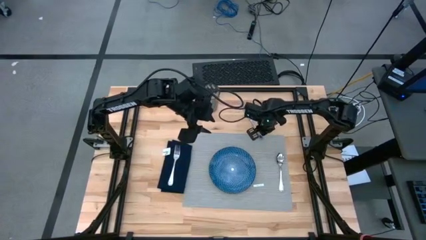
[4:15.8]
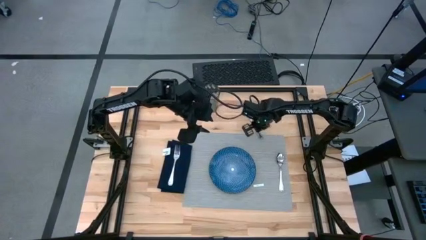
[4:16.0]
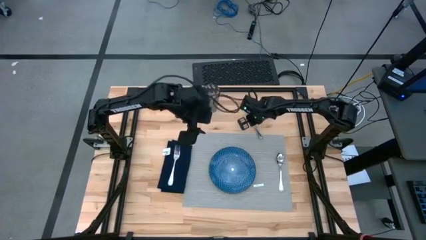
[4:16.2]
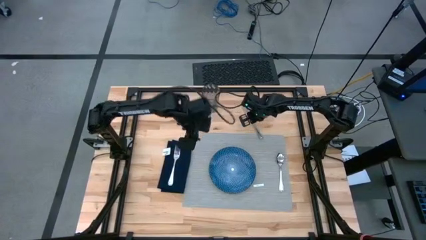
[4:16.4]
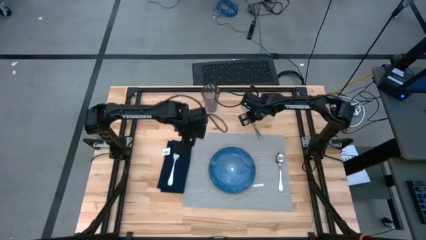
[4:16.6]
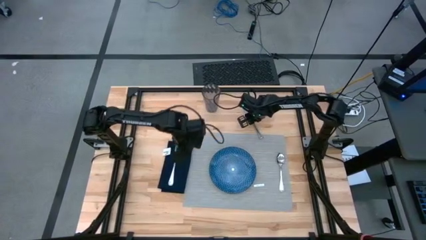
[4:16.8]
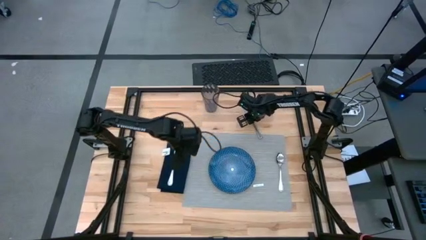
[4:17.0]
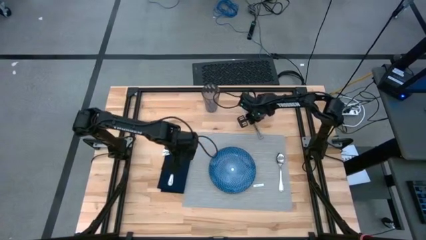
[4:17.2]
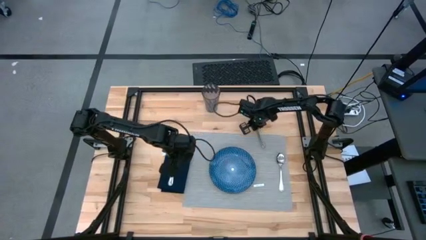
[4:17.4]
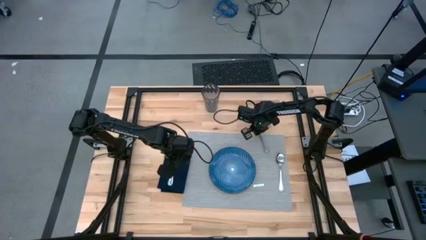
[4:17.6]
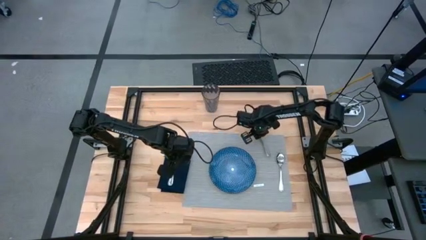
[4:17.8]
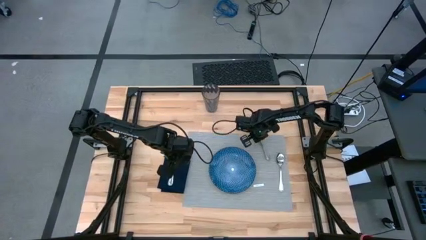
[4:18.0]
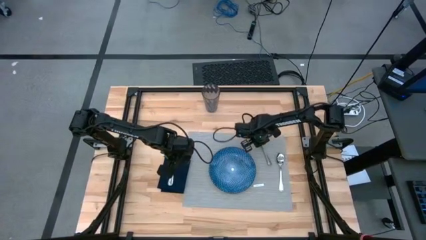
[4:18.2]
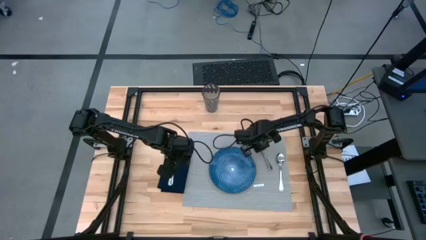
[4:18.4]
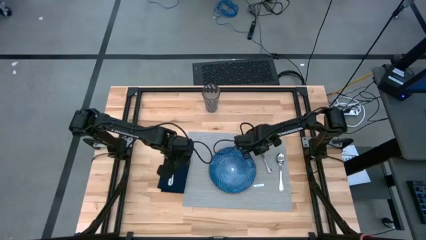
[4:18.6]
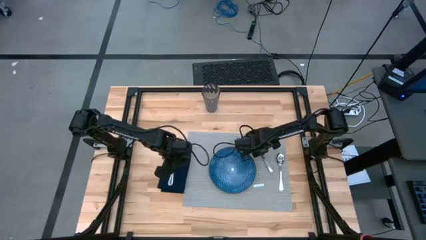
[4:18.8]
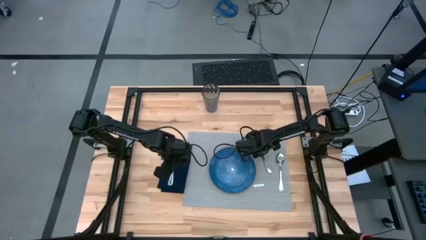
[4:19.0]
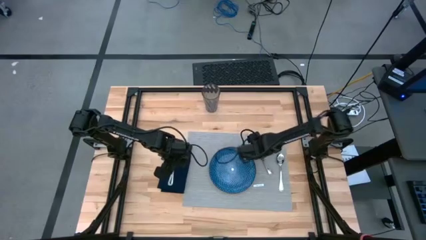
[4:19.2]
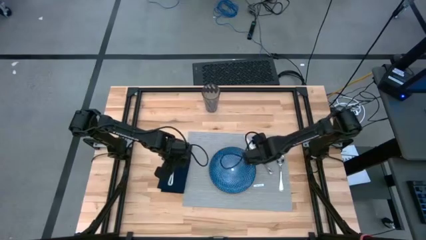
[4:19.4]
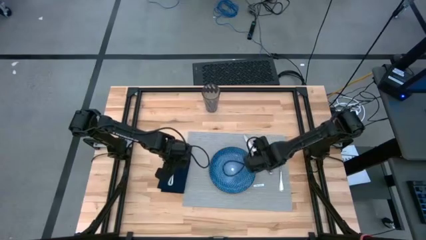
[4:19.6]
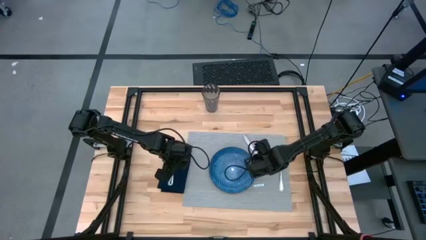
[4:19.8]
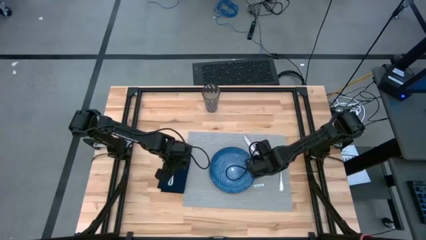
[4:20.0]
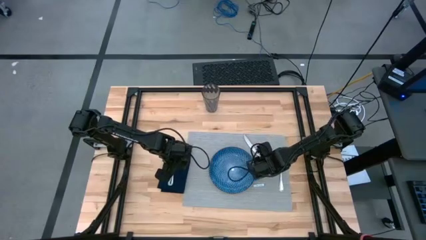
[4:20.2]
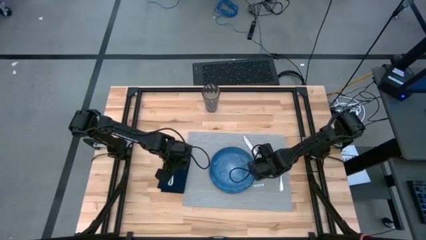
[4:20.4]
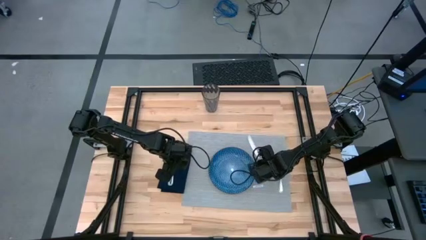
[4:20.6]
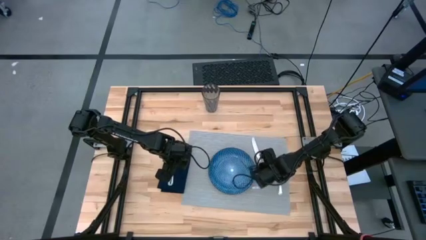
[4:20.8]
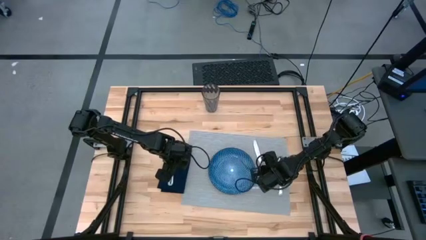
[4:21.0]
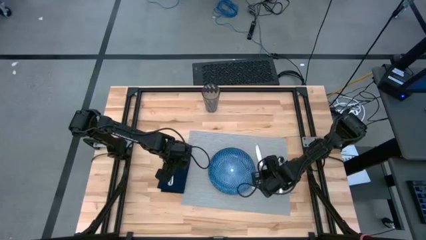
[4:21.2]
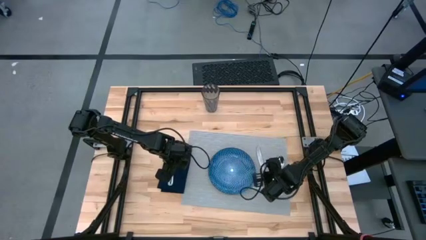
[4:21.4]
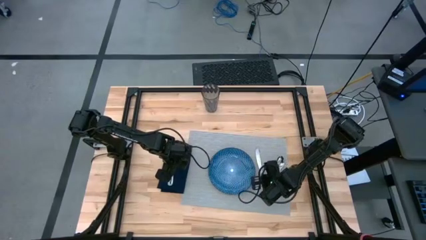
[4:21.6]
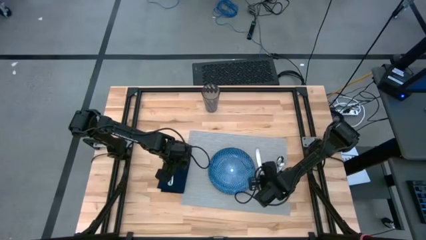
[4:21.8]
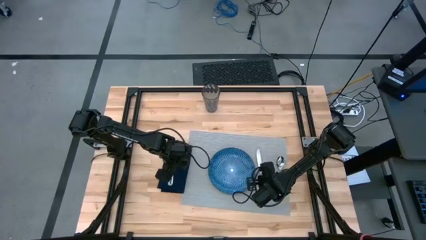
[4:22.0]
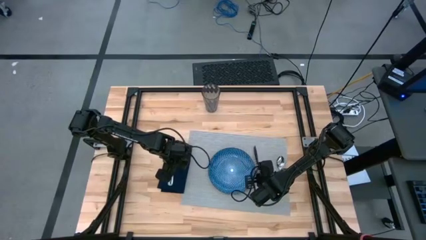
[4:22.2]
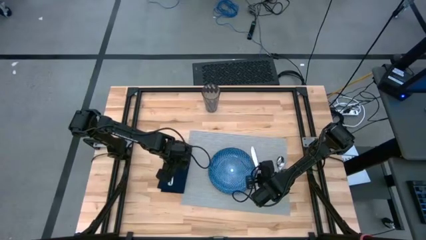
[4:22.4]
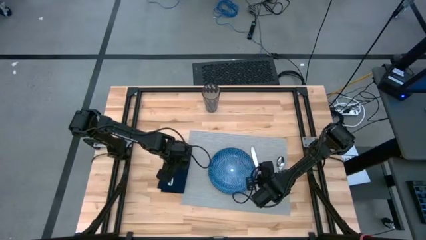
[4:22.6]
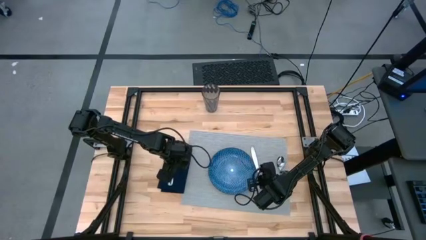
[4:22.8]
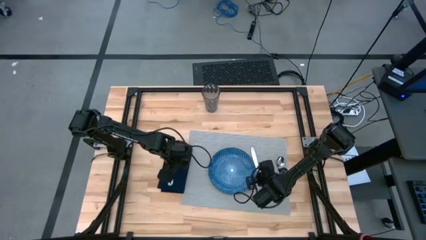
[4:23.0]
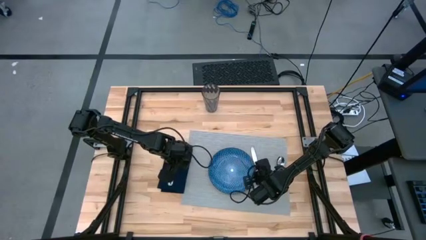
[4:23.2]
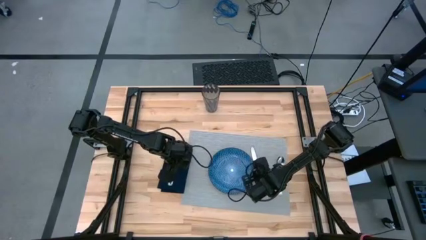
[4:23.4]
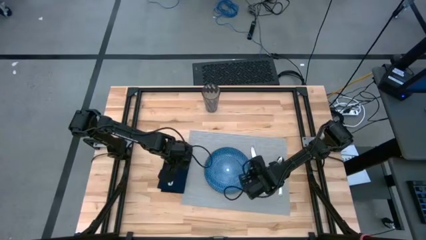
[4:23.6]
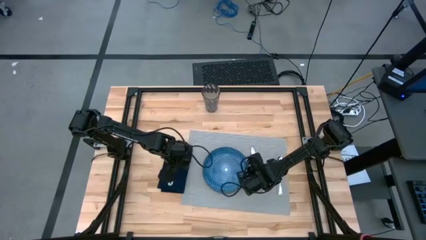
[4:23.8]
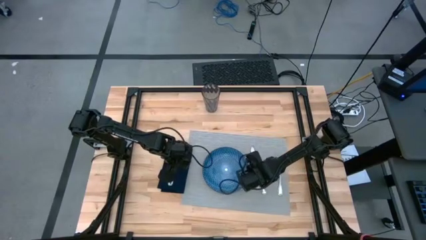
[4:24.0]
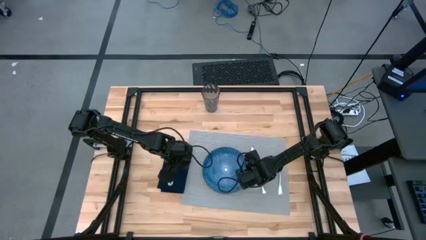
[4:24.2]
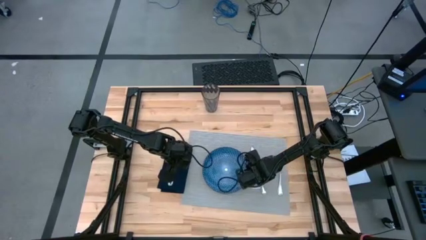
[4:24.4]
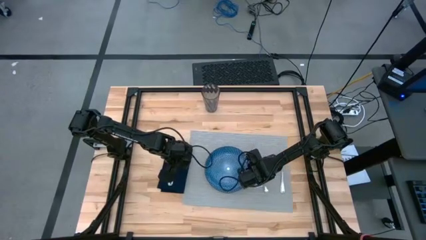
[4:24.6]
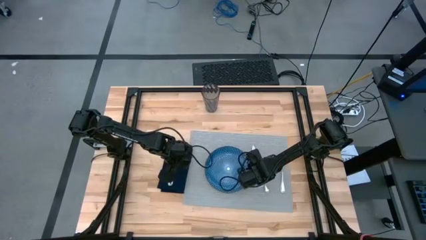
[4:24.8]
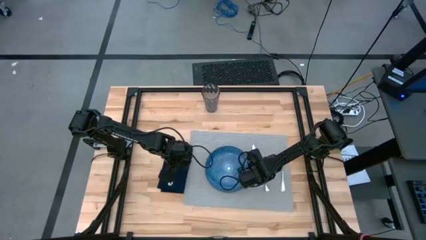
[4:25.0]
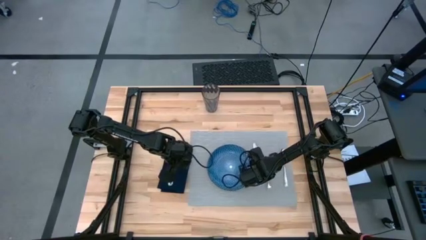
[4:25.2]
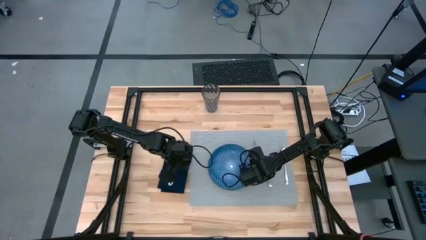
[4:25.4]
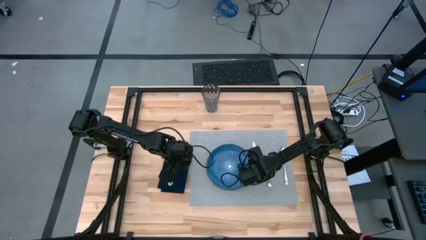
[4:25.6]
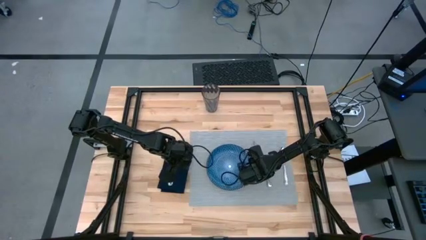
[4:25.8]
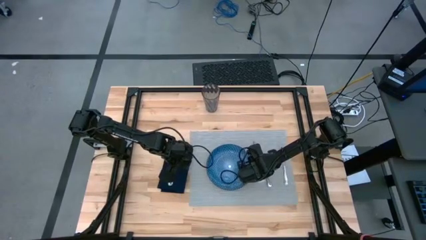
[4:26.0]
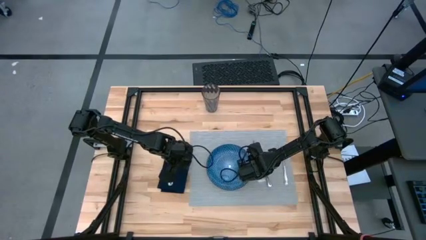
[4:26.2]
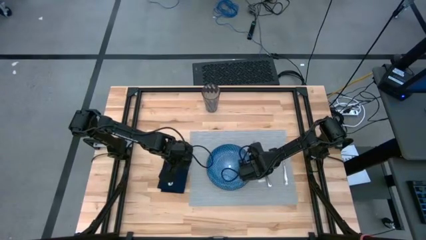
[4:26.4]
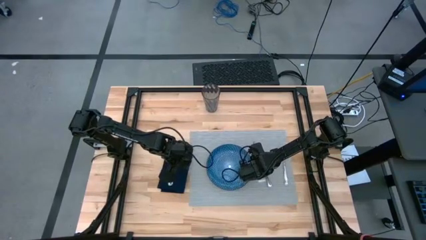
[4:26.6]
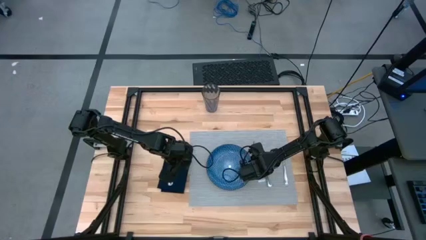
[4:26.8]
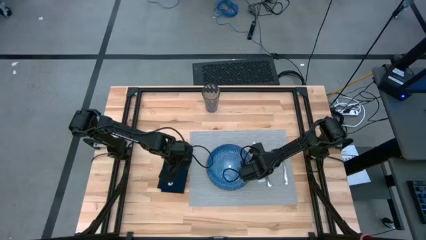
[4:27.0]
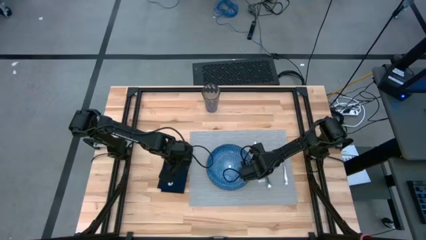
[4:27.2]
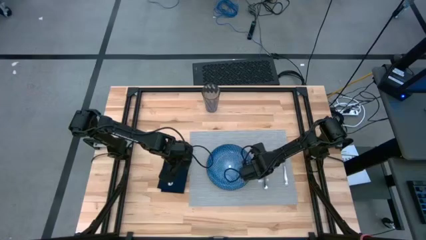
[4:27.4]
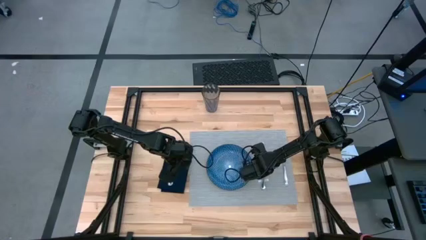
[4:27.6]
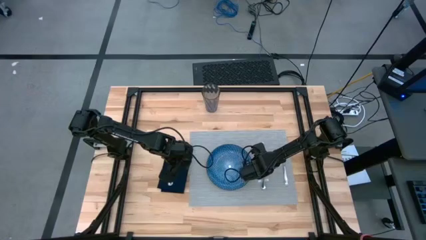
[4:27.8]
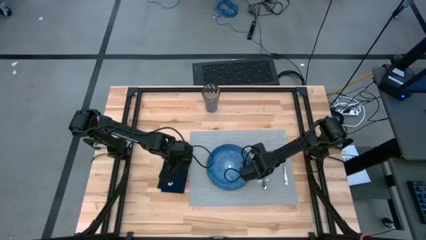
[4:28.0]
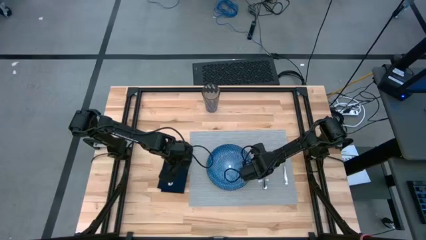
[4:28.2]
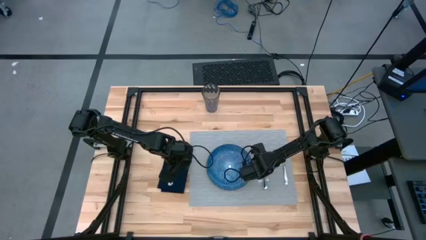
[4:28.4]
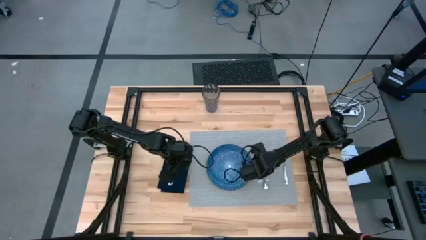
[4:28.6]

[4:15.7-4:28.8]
Task: Set table place
Put the silver knife to the left of the silver spoon on the gray placemat

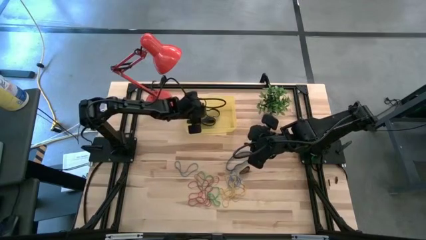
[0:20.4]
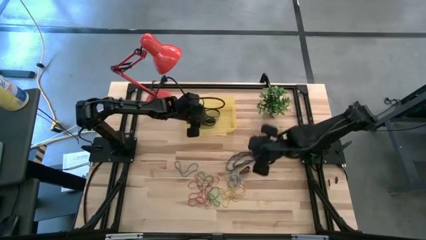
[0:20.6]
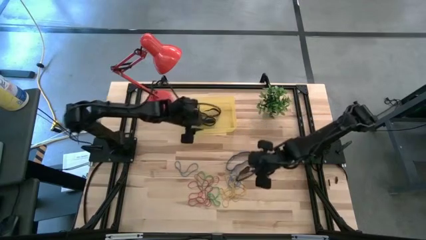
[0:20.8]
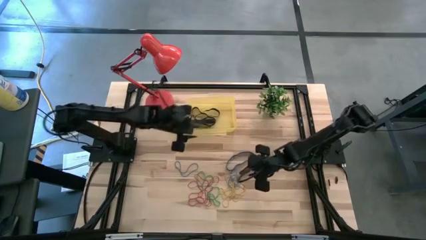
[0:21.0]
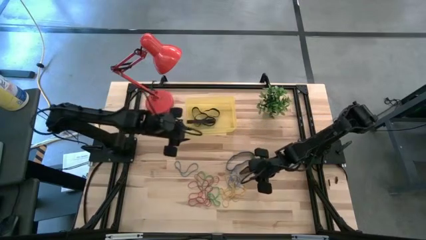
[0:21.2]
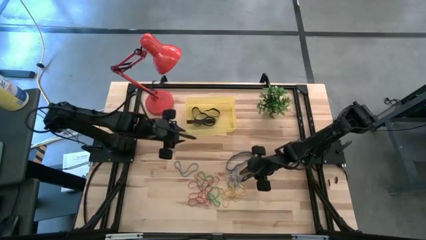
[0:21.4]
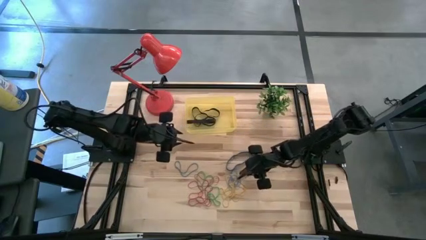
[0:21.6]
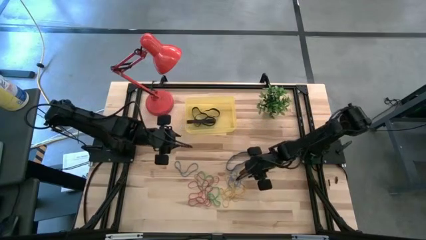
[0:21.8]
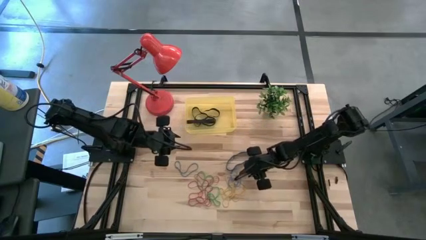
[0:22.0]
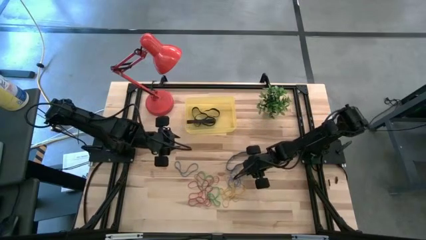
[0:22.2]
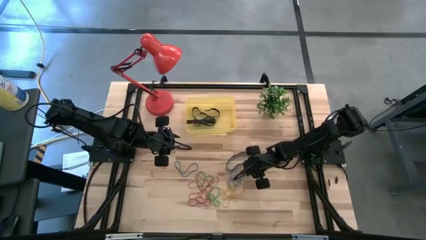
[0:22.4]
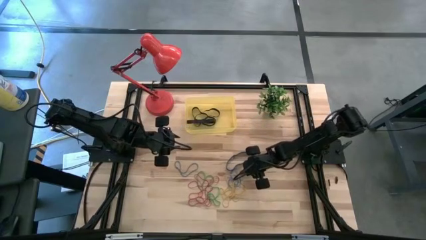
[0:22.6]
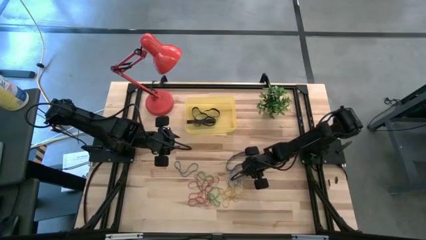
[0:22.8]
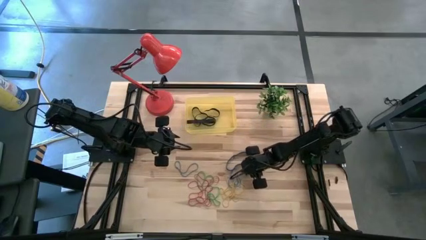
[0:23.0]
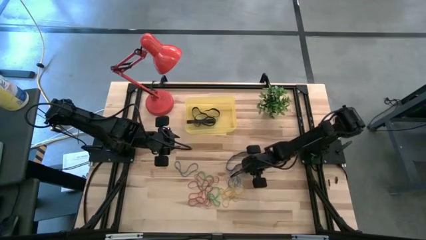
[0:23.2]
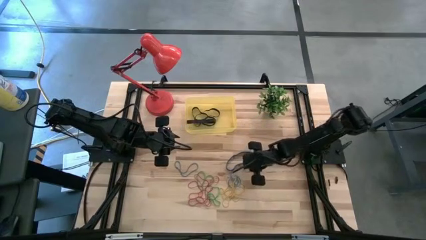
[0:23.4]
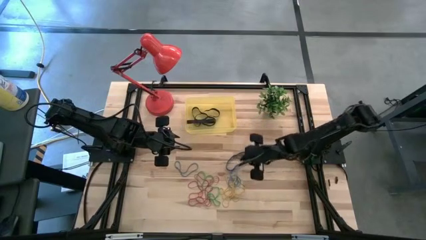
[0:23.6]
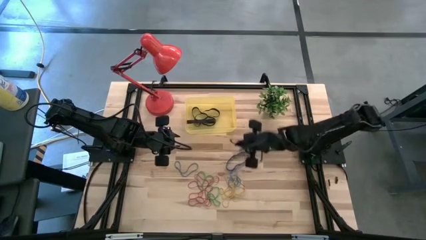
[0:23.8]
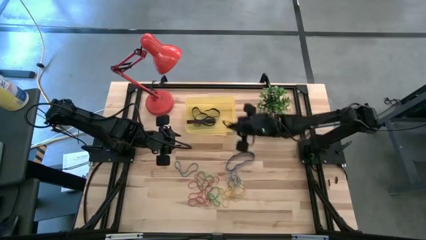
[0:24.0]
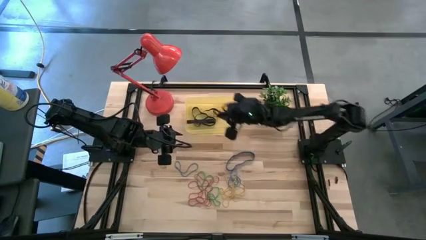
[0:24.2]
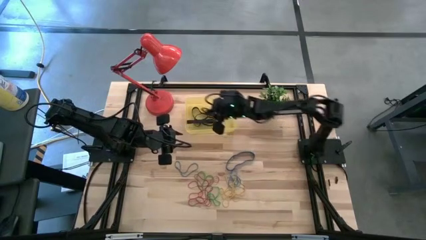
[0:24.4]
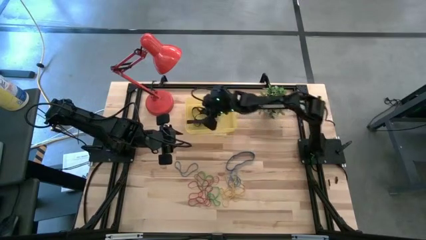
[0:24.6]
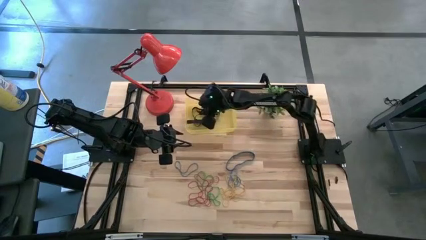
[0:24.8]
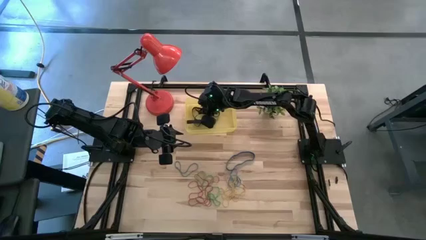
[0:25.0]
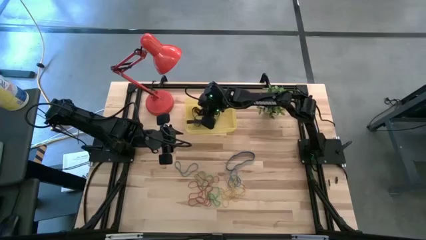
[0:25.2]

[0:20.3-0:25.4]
Task: Pick and place rubber bands into bin
Put the black rubber band into the yellow container
